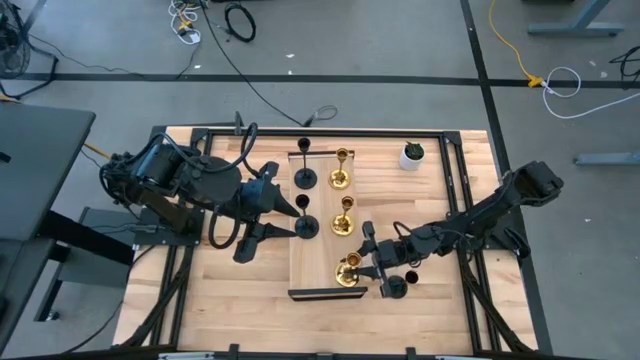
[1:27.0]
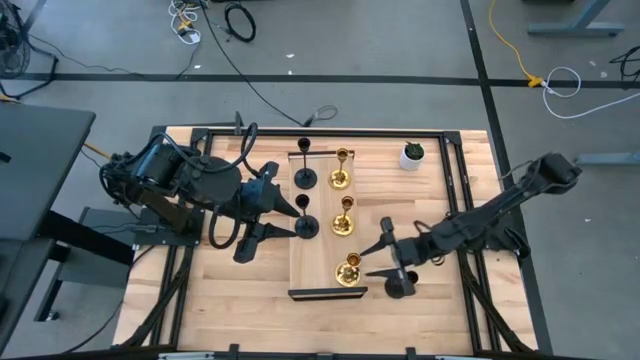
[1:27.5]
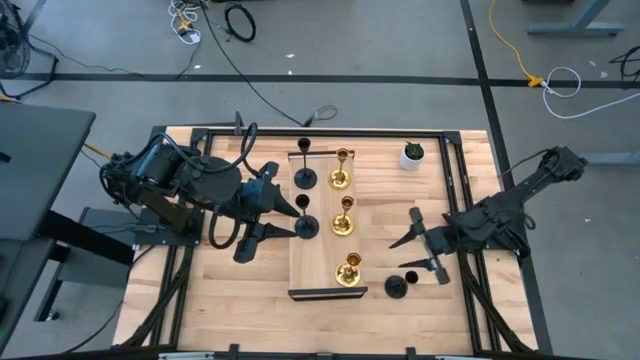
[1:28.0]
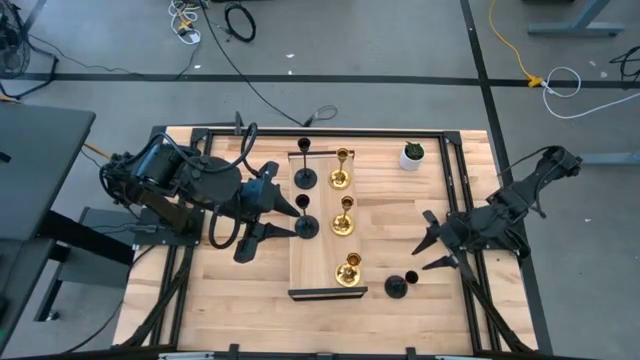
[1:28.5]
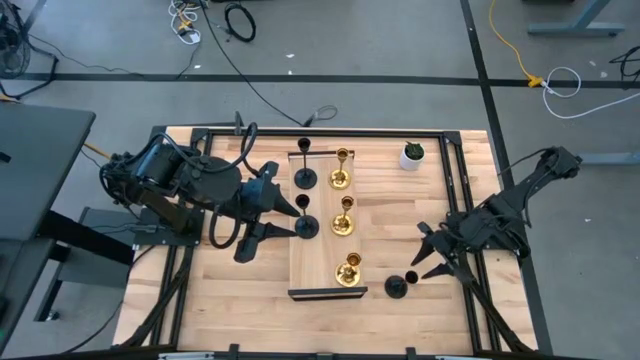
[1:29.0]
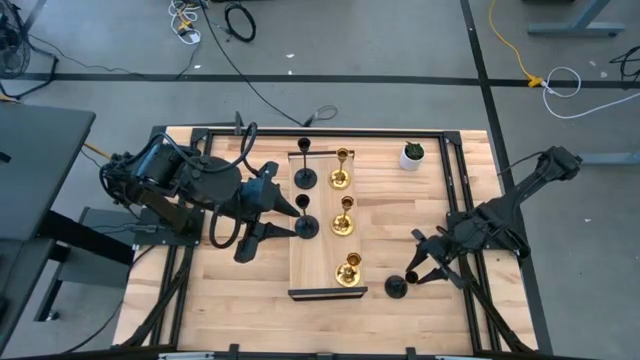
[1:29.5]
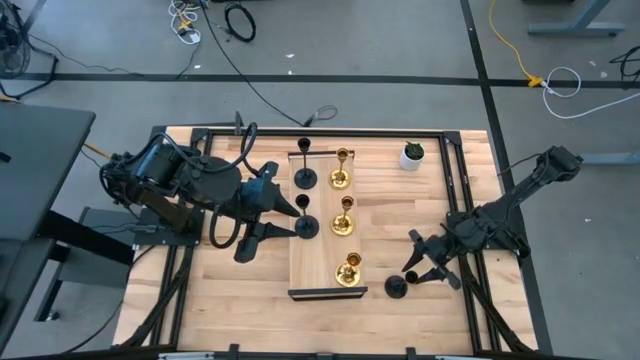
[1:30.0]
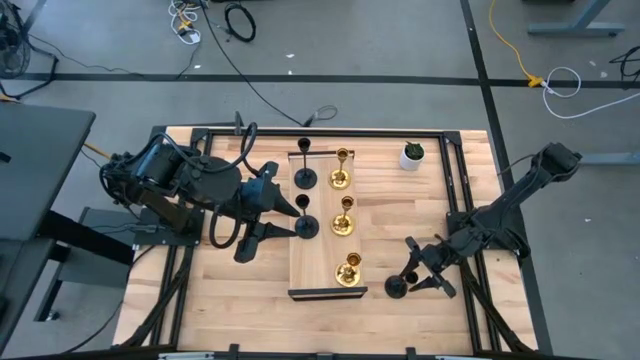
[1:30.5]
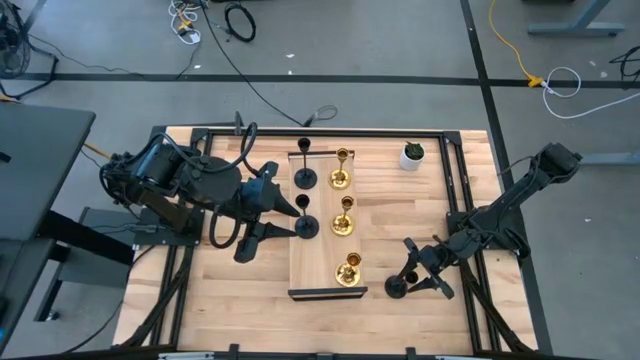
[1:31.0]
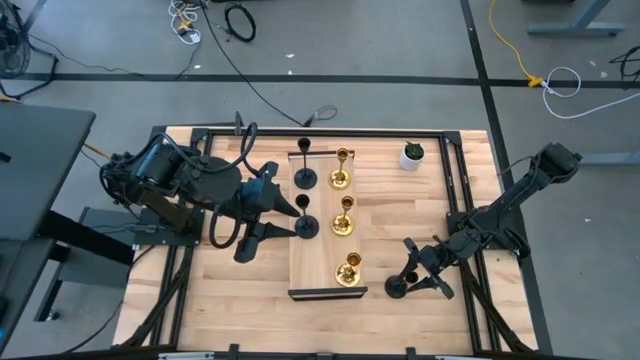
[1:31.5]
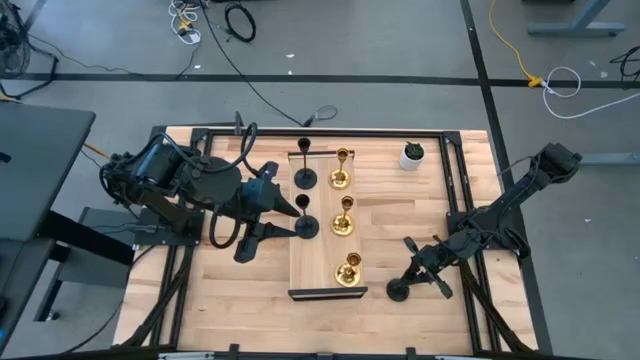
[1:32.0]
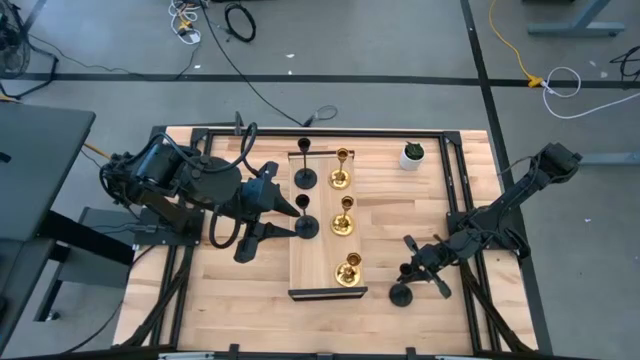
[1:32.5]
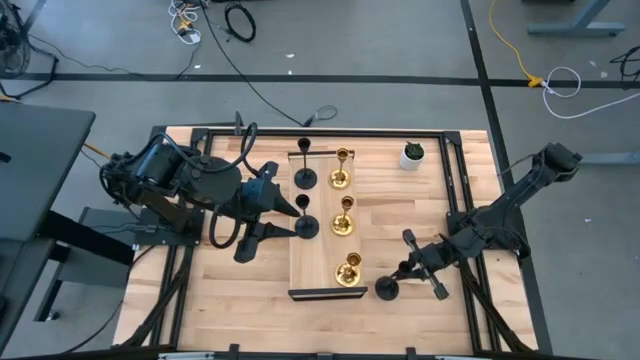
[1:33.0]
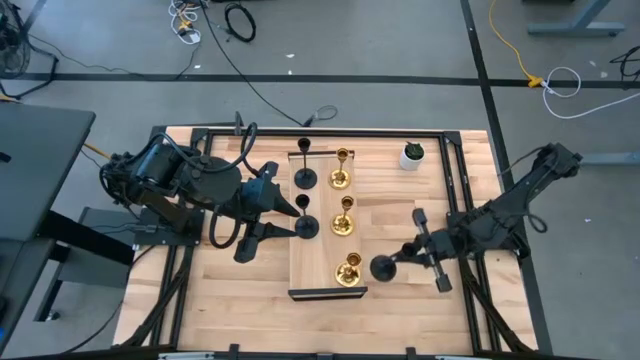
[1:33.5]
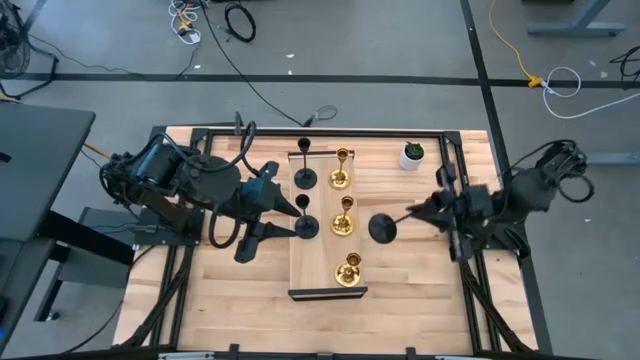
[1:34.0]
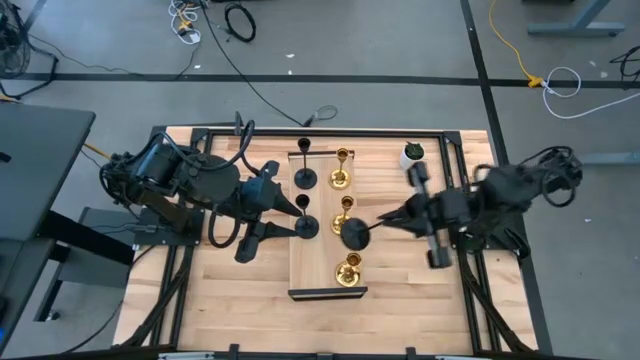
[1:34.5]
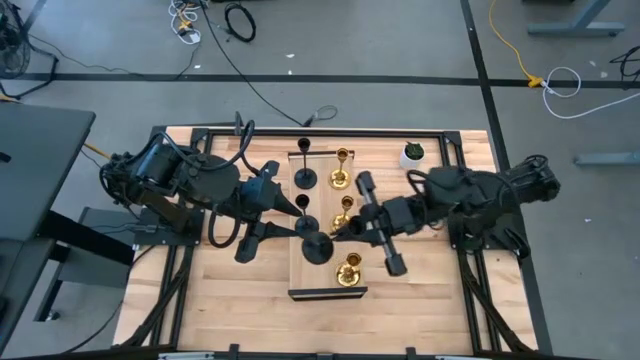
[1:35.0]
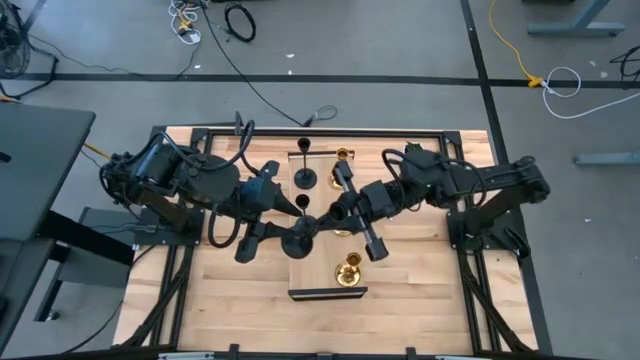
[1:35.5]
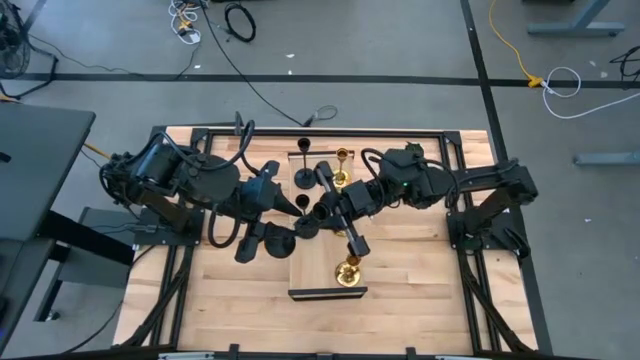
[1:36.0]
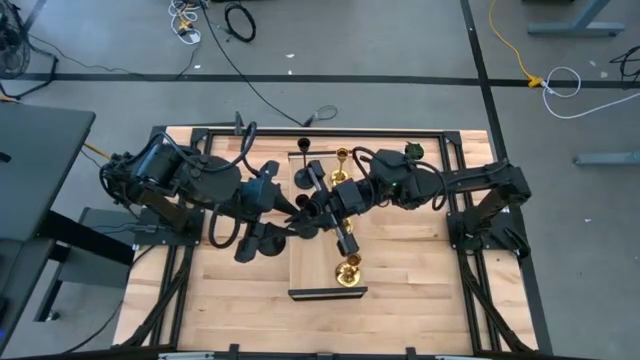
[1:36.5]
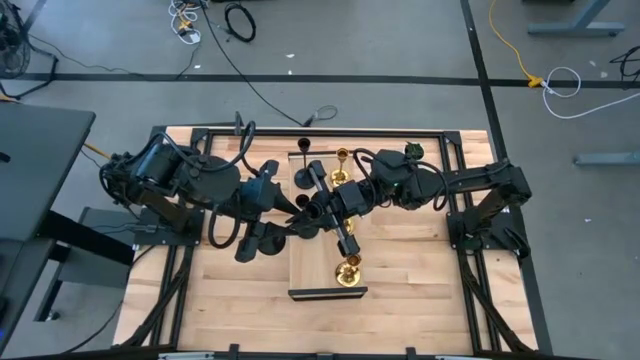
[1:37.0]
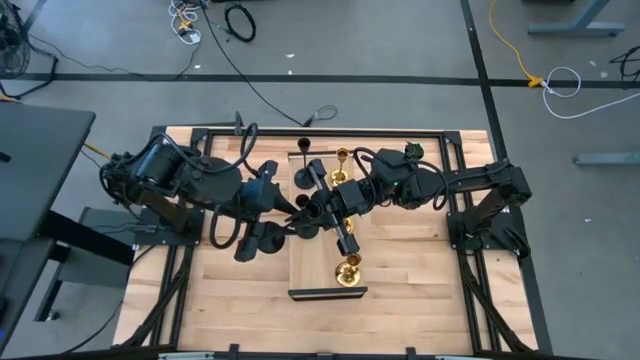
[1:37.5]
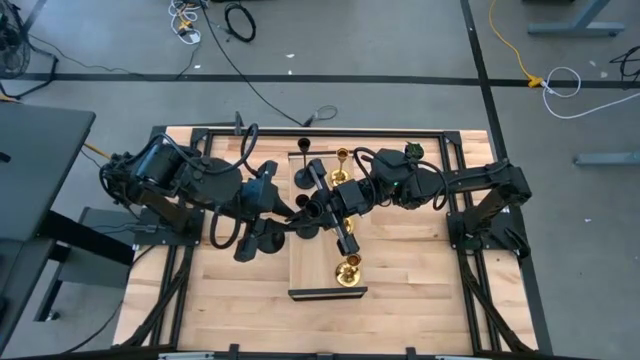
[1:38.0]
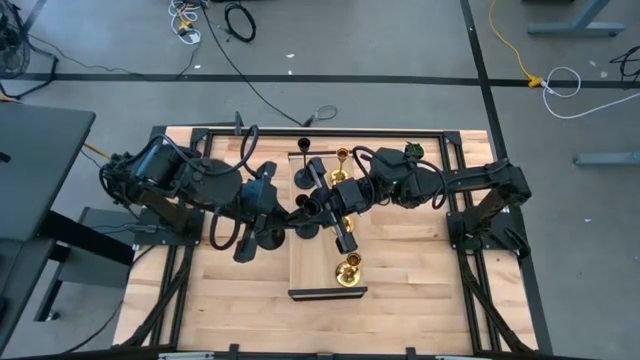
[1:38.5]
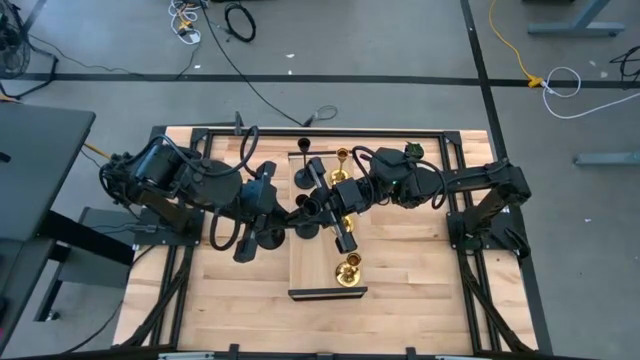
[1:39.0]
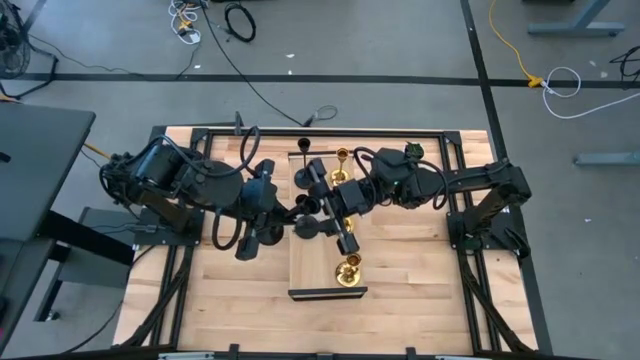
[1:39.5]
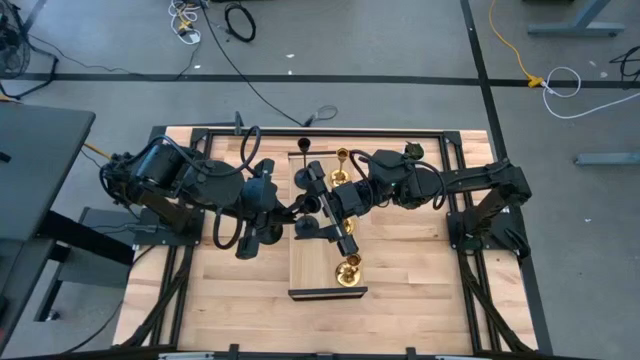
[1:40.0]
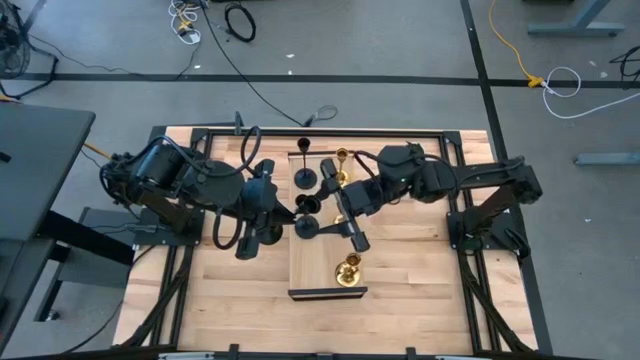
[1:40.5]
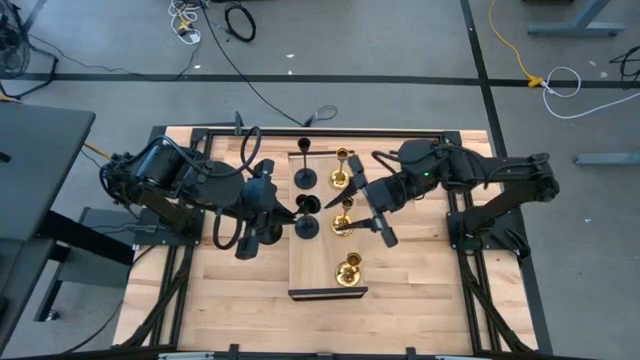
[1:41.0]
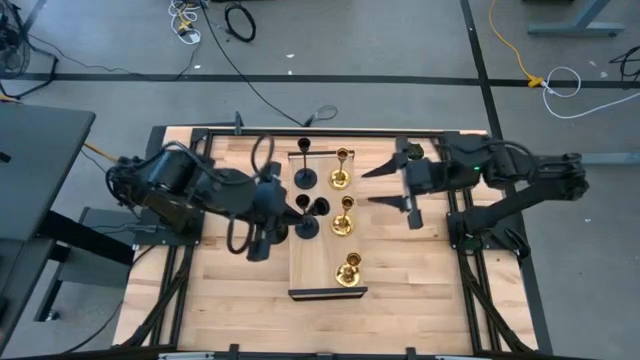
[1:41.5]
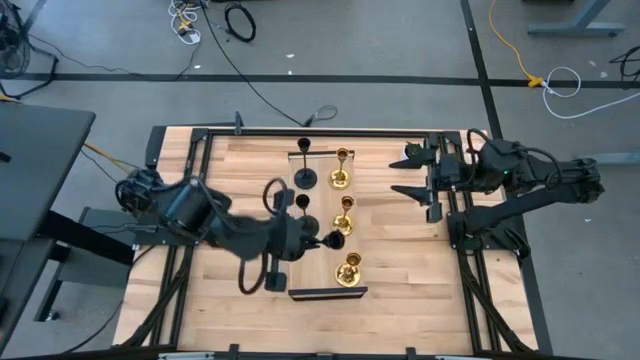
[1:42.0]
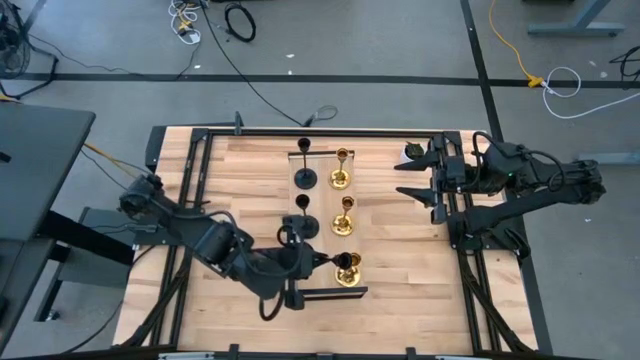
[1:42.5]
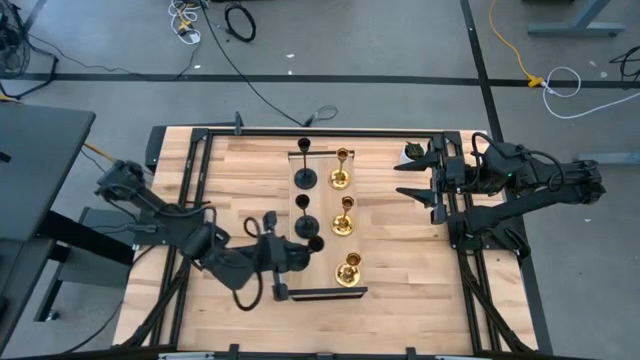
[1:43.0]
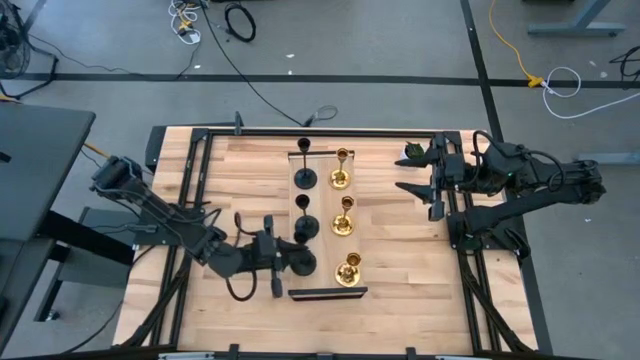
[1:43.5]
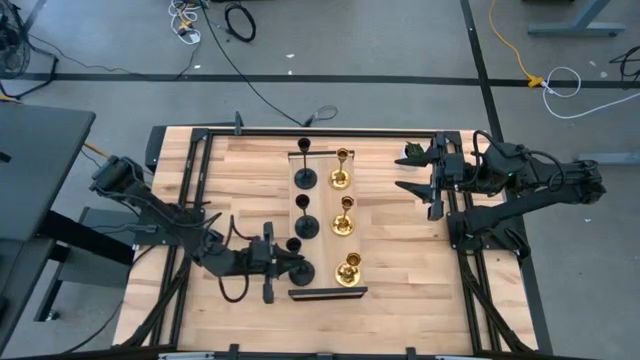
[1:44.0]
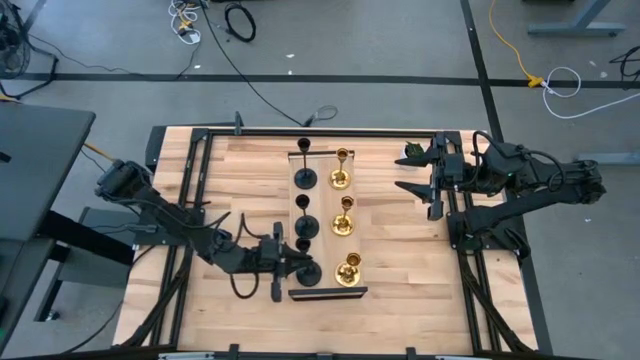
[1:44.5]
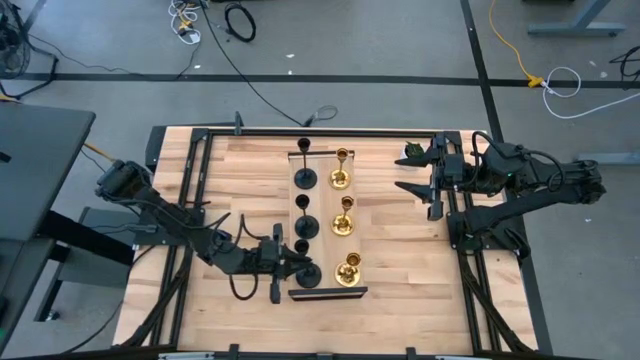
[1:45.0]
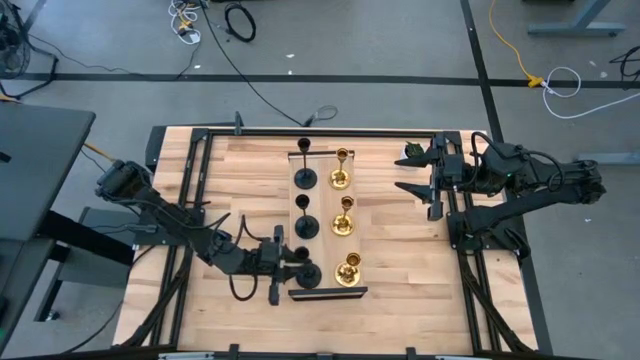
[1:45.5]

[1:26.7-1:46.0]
Task: Pick & Place candle stick holders
Put the black candle holder on the shelf aligned with the golden candle holders

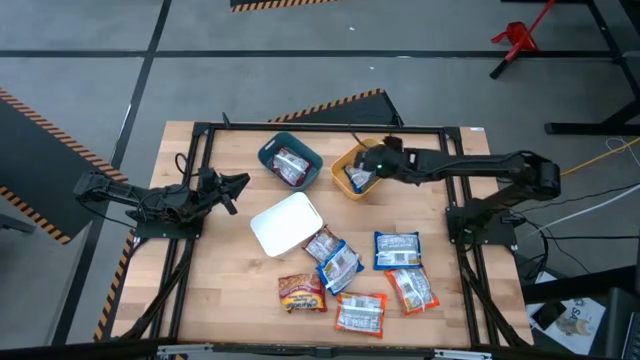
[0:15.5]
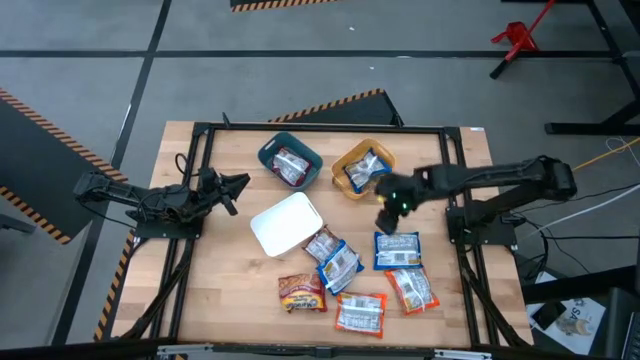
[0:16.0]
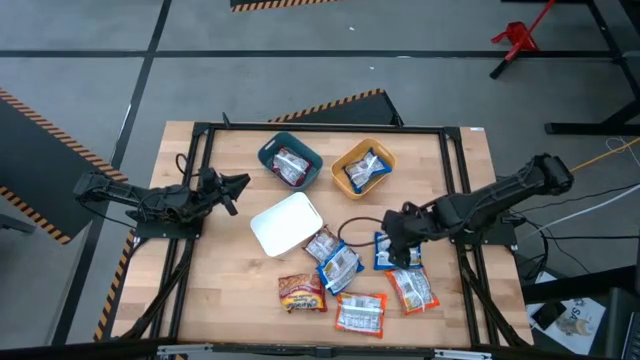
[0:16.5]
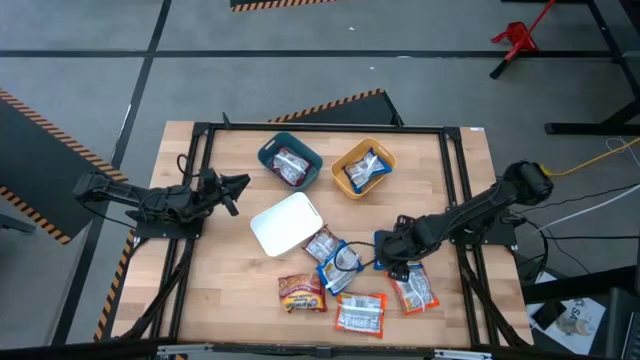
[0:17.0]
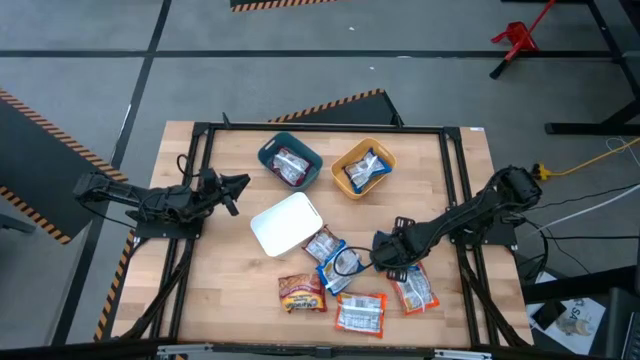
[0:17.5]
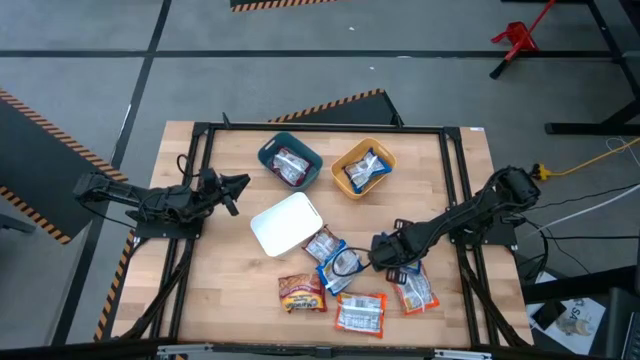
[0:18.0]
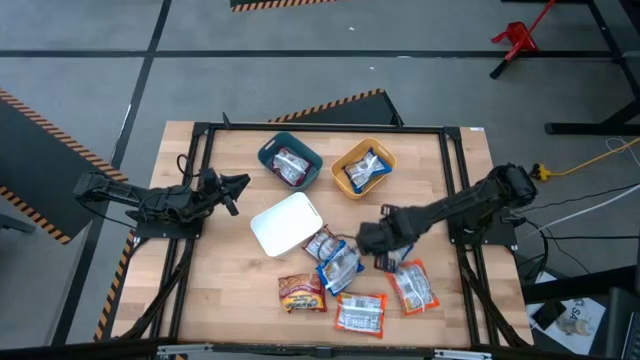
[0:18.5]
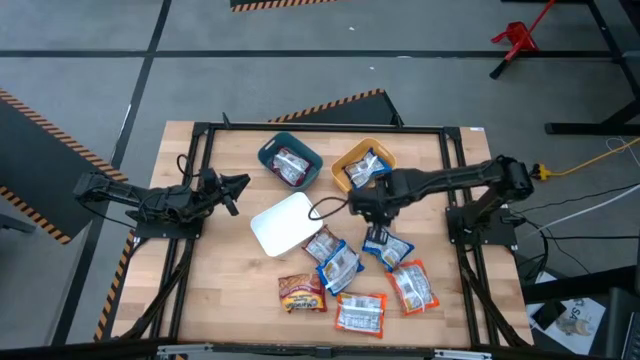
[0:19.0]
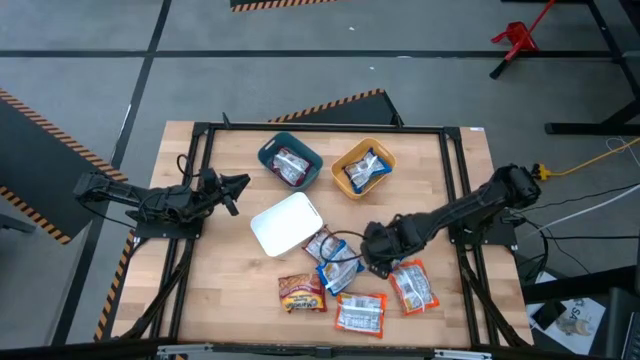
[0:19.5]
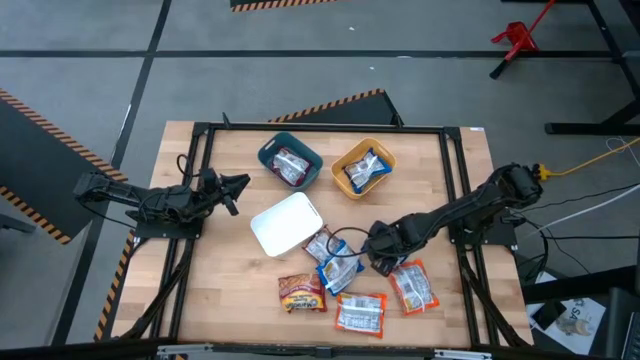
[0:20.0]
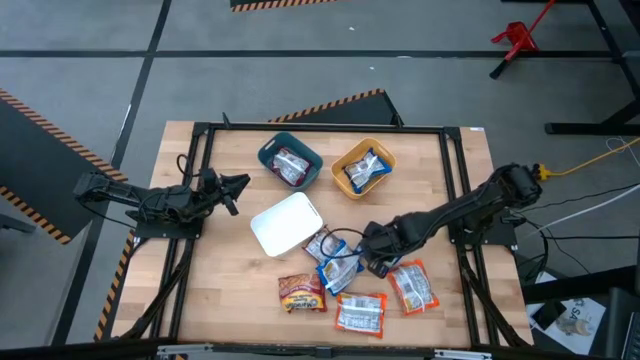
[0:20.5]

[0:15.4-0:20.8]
Task: Sort Maruchan noodles
Put the right blue noodle pack into the yellow bin
